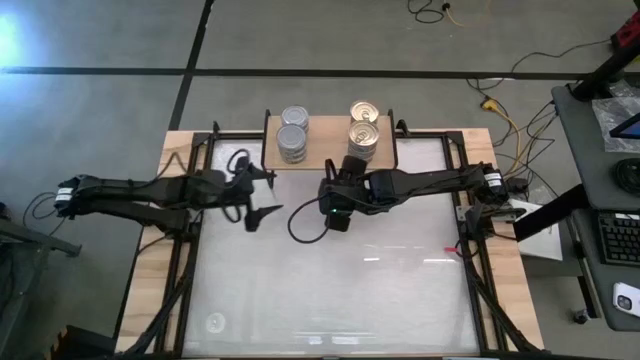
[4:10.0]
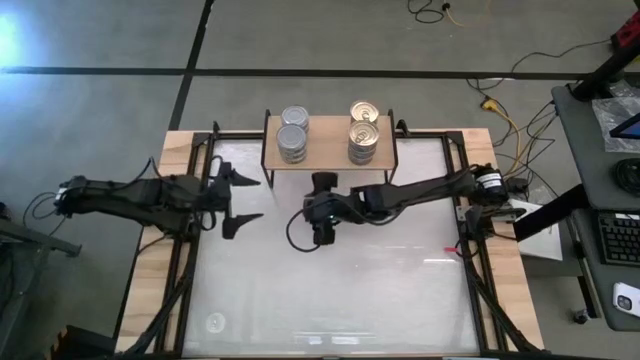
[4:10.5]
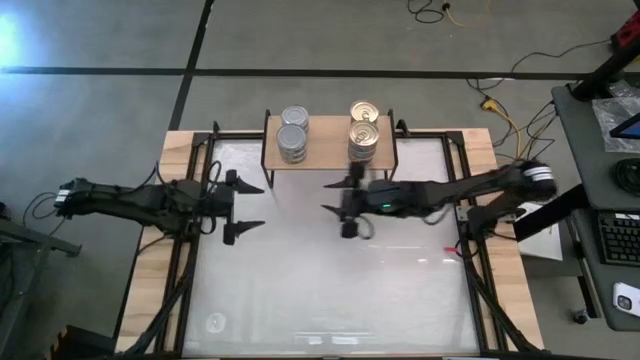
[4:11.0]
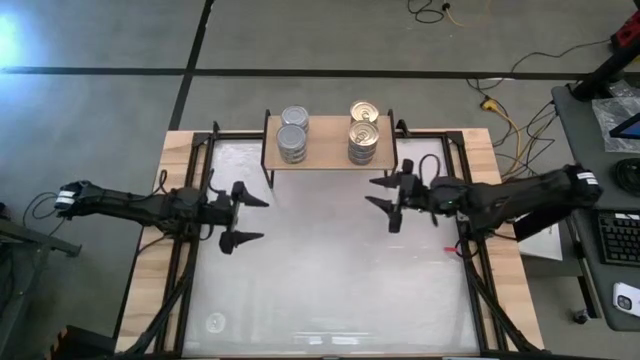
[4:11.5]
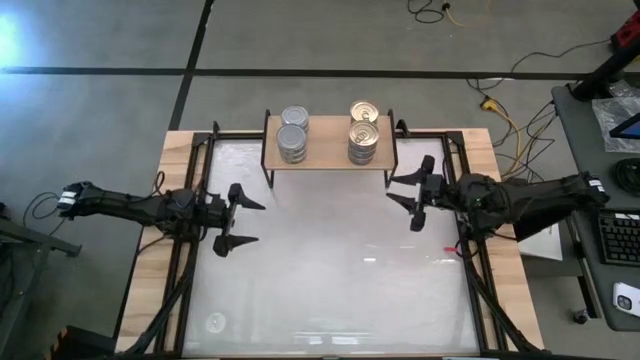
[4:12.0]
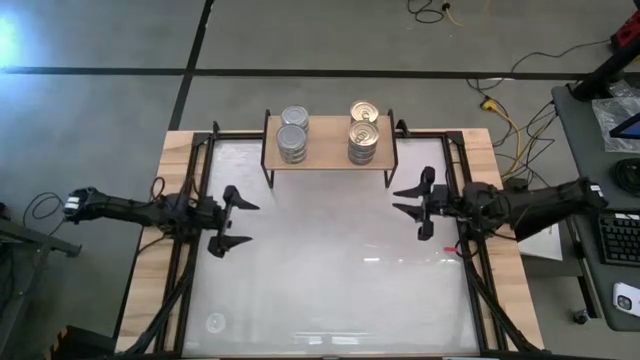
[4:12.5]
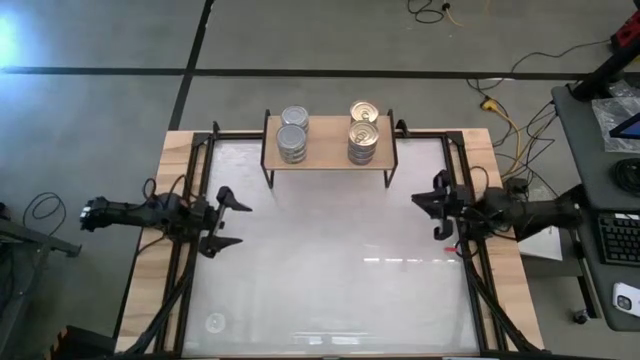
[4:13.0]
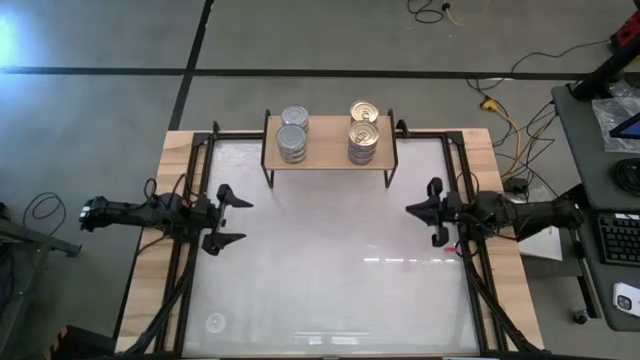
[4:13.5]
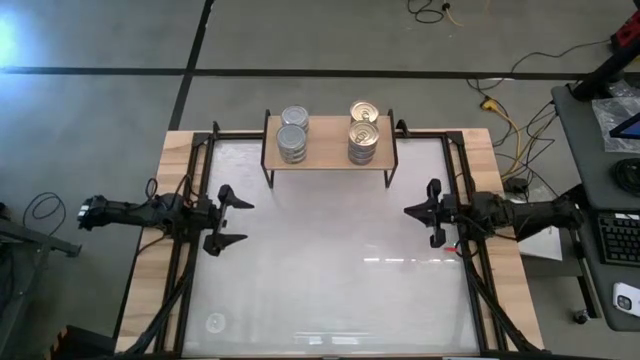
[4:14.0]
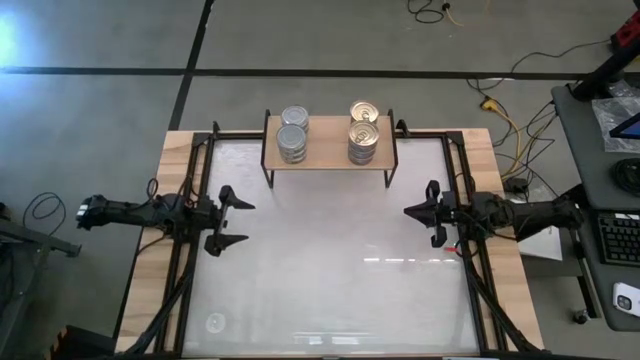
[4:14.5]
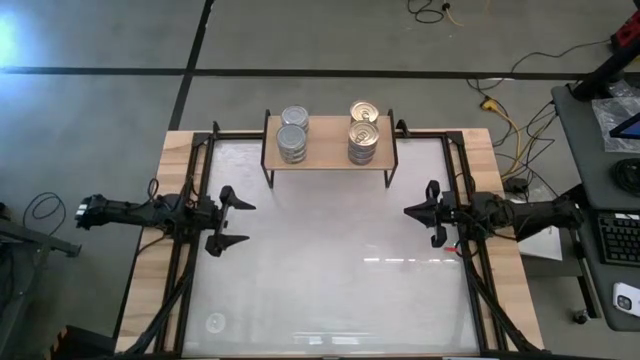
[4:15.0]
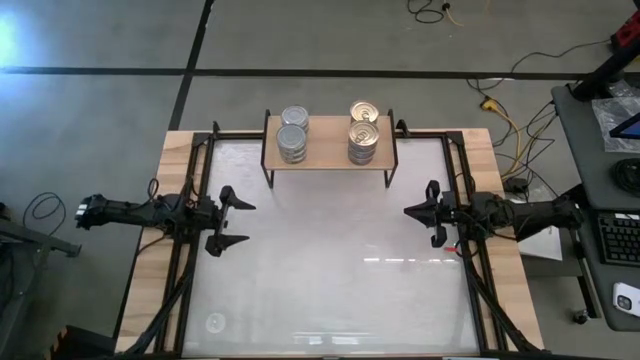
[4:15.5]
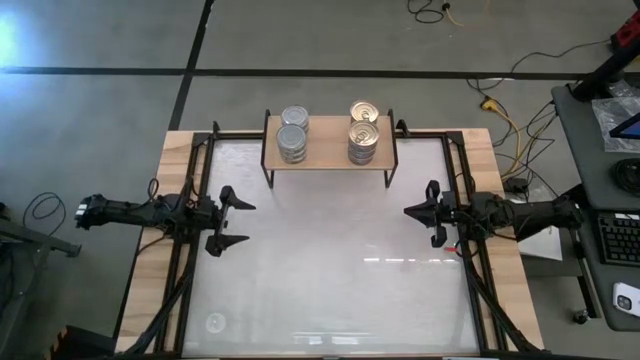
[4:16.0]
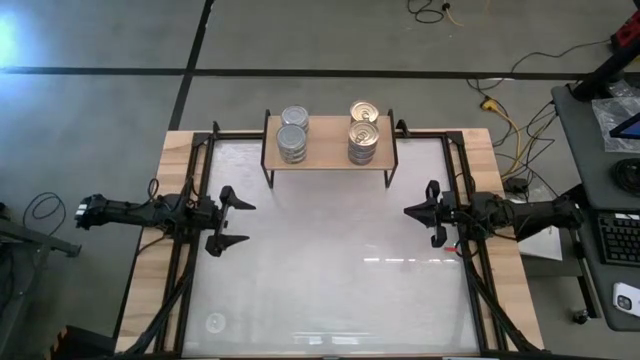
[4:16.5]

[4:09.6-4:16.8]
Task: Stack canned seafood by type on shelf
Return to Home Position

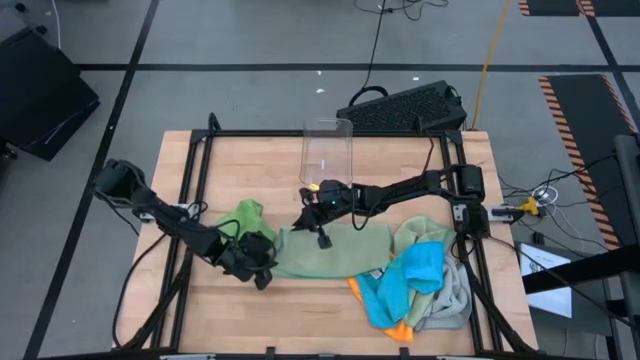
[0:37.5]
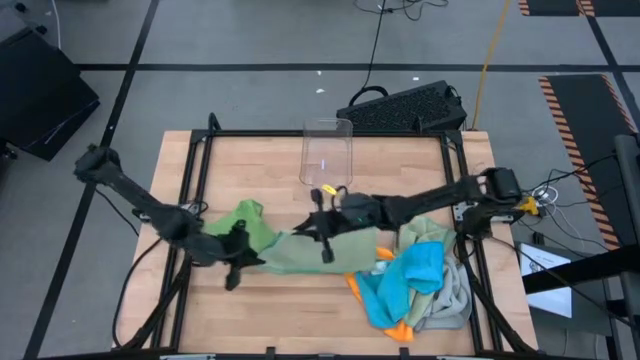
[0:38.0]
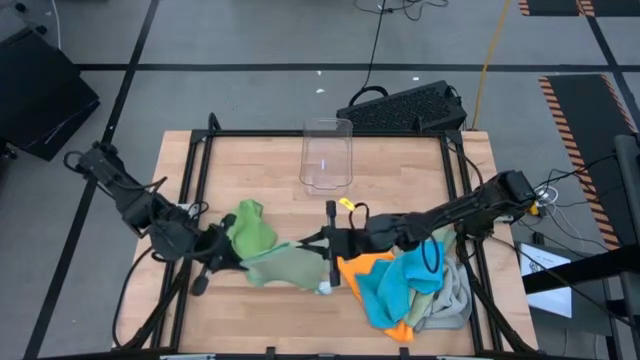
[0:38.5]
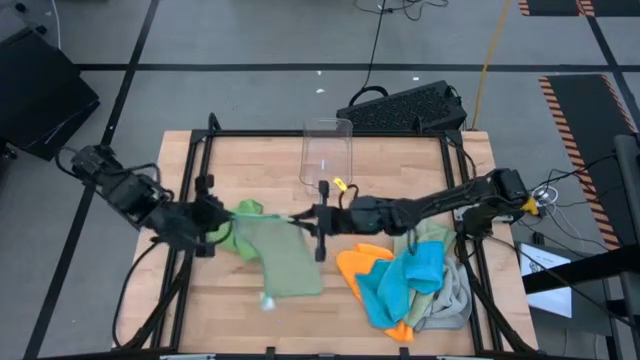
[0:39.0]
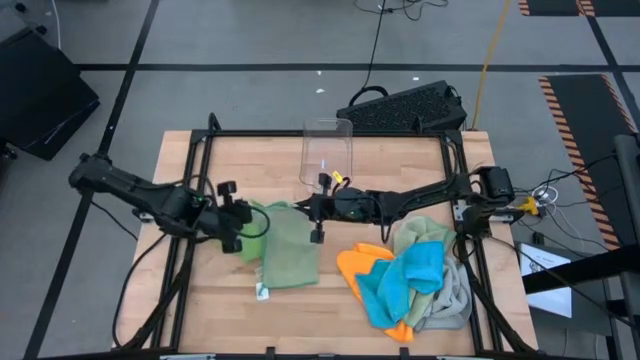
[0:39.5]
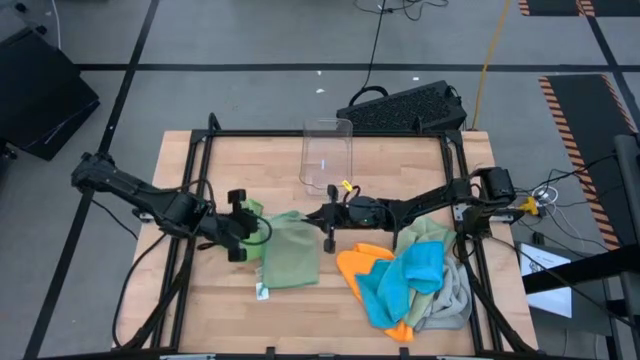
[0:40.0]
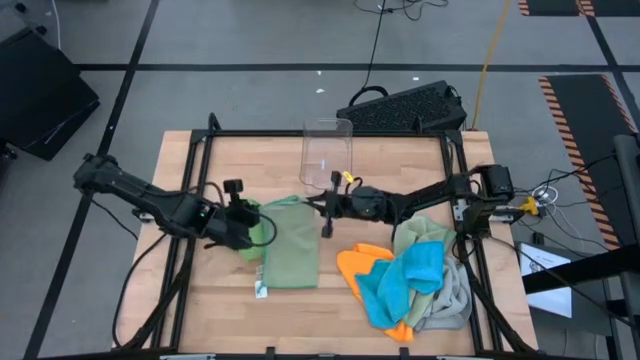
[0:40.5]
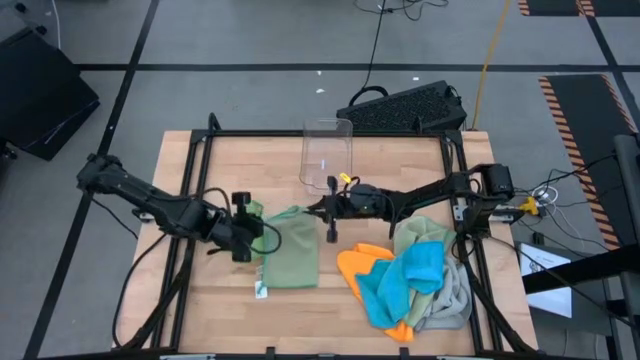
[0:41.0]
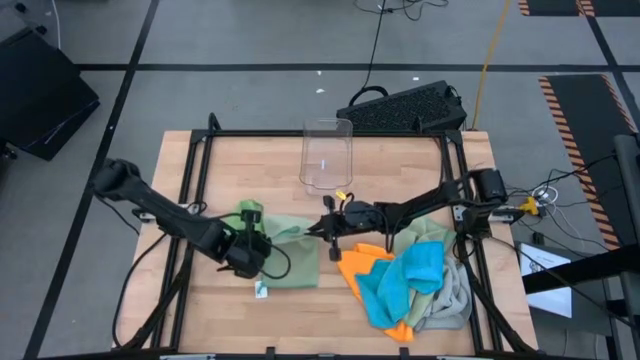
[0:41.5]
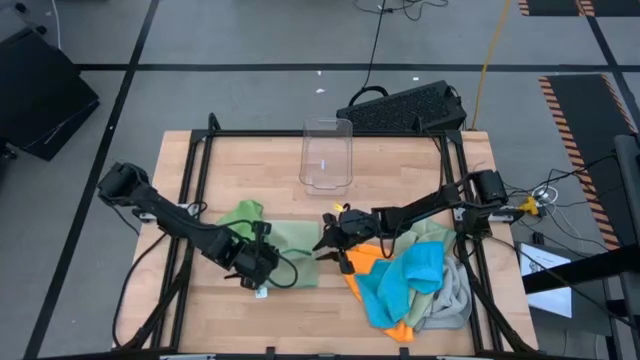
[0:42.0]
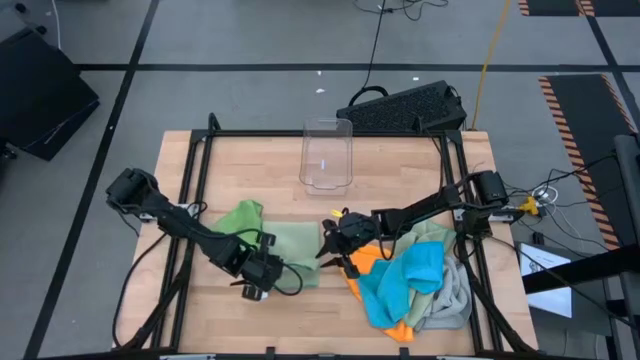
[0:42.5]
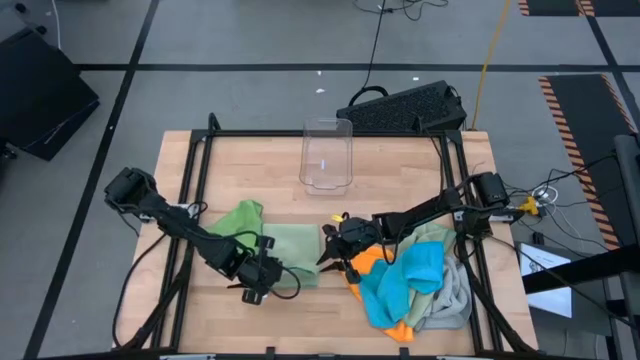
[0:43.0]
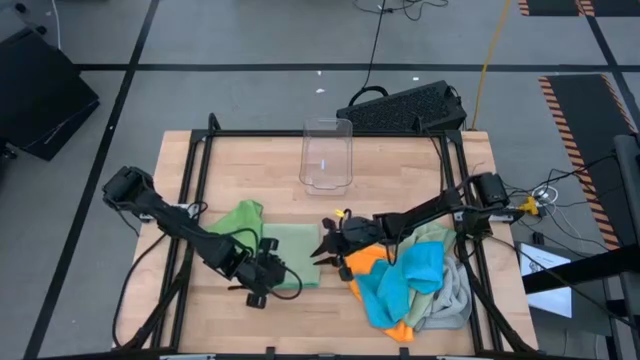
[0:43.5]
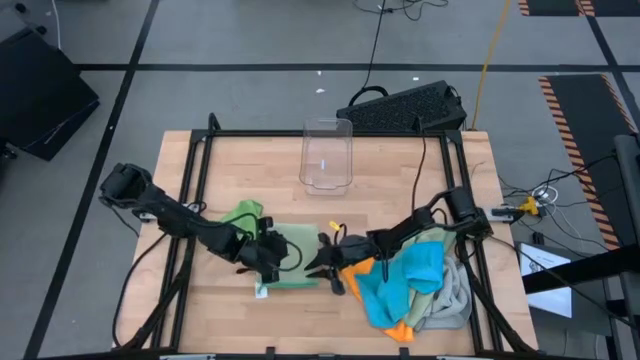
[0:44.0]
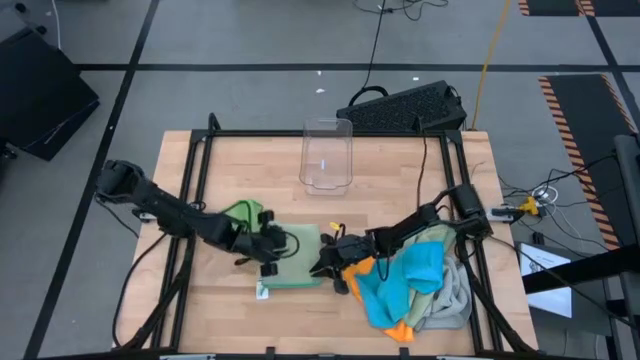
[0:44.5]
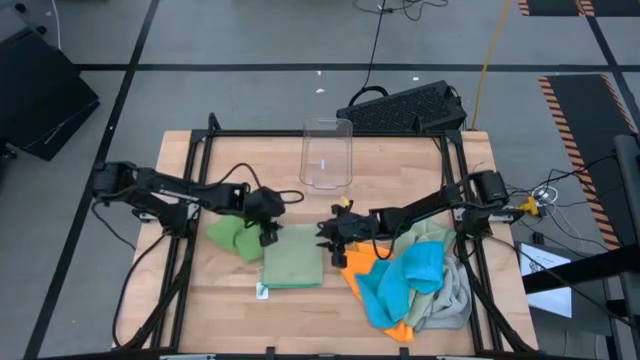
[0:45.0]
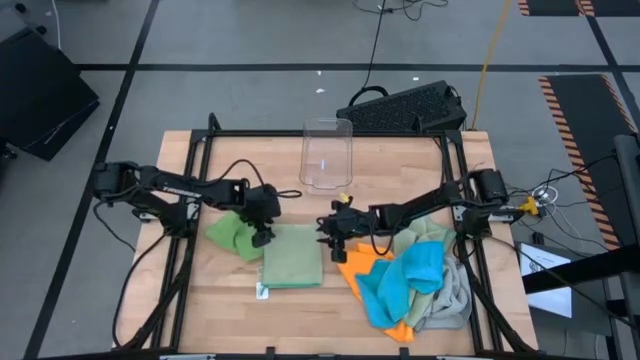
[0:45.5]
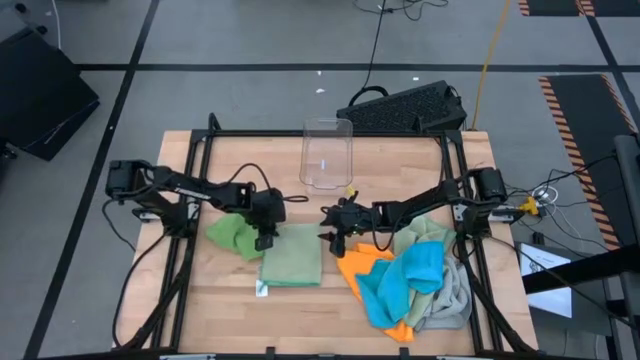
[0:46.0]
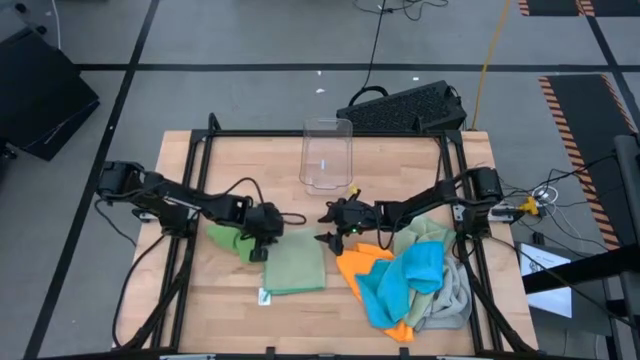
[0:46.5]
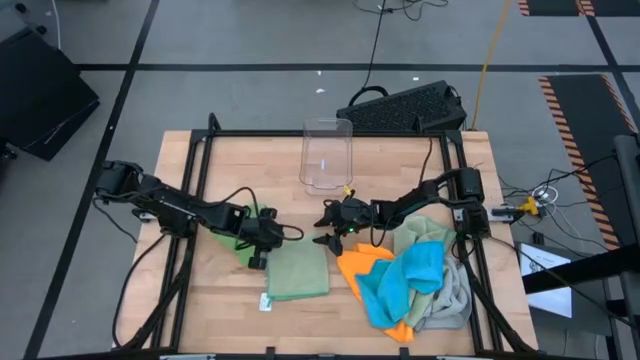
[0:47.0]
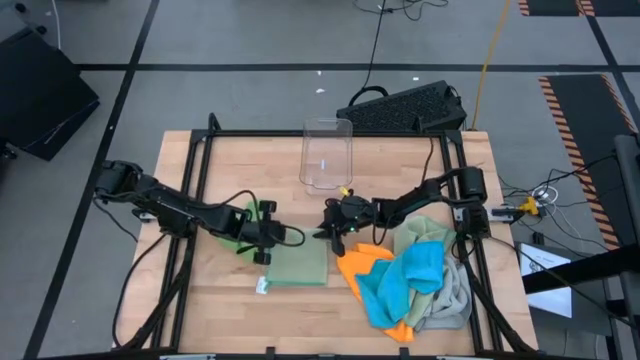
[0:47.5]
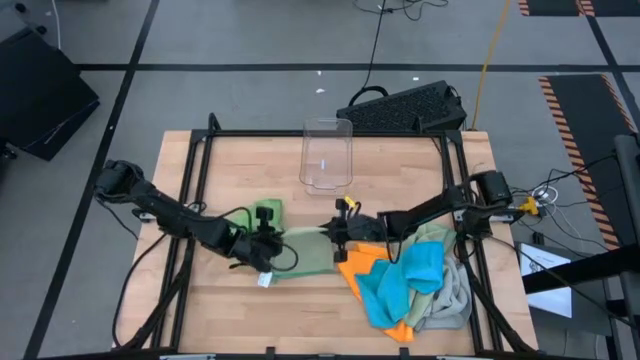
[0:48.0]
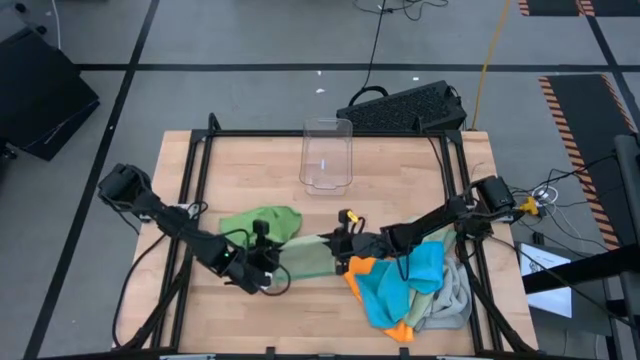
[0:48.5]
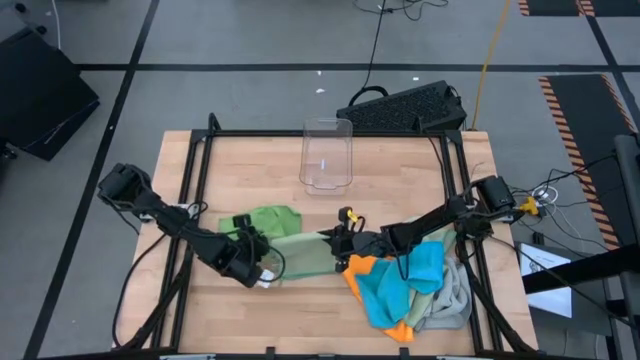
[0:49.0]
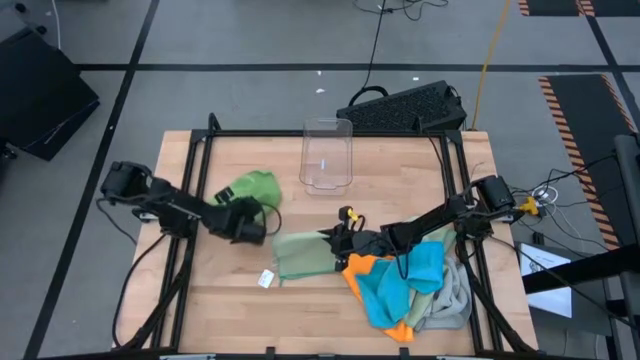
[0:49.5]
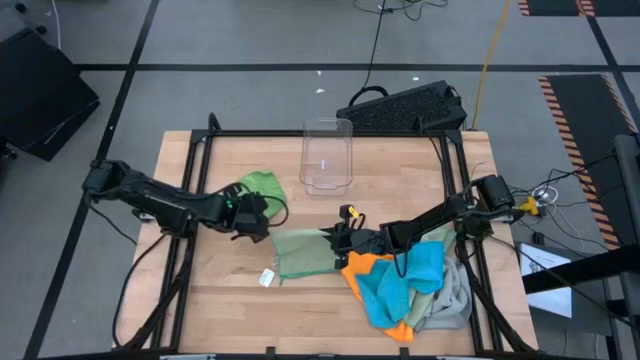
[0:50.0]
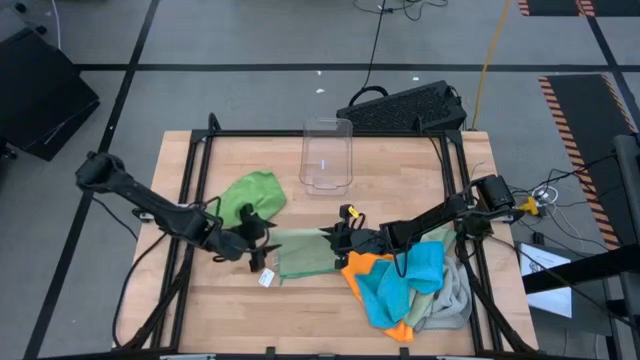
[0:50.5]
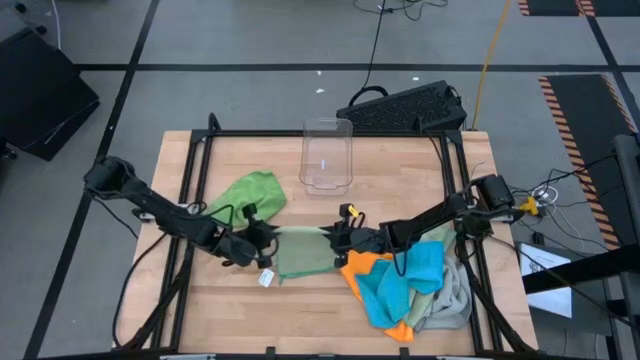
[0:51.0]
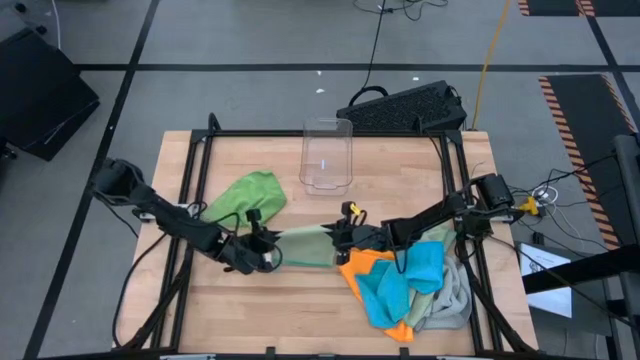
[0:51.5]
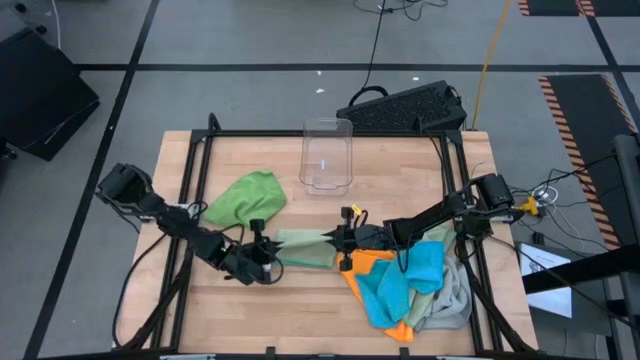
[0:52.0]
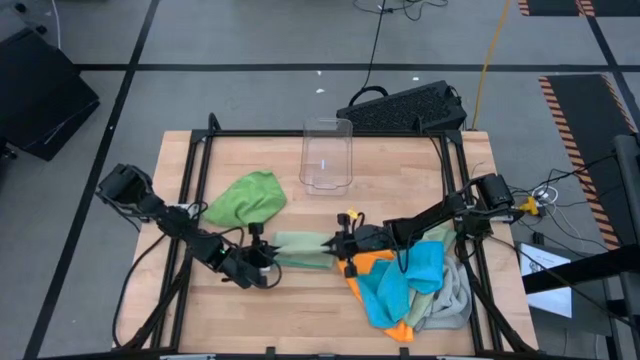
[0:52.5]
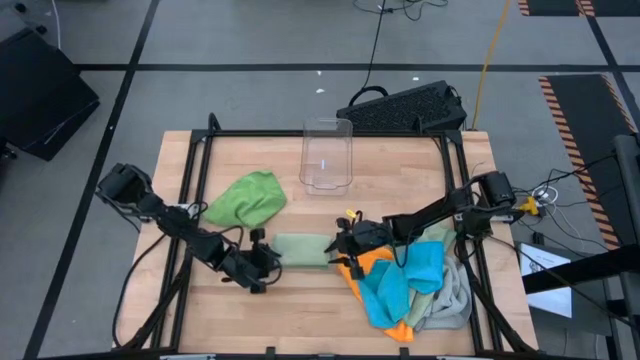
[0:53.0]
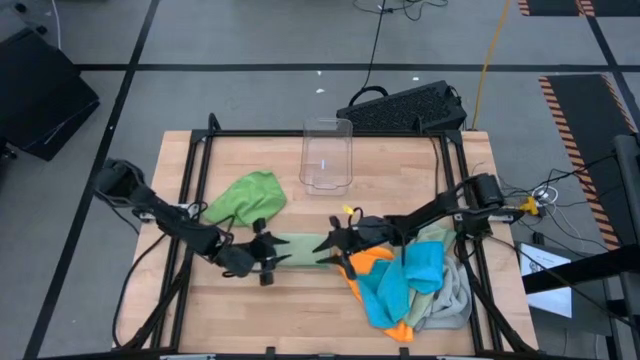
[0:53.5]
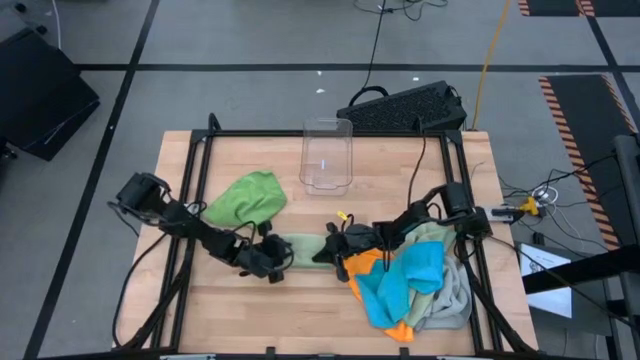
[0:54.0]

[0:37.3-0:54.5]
Task: Fold microfiber towels
Fold the left light green towel
